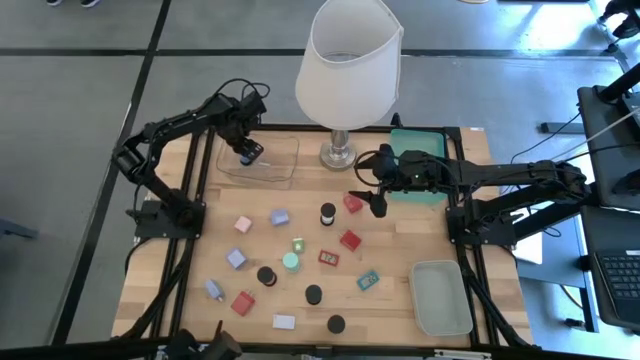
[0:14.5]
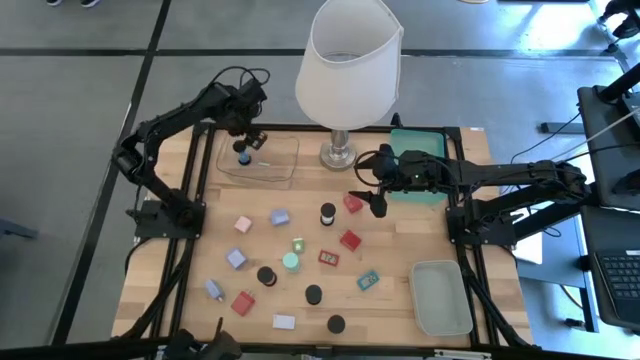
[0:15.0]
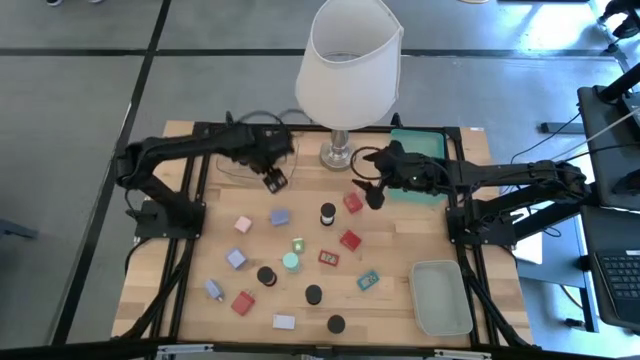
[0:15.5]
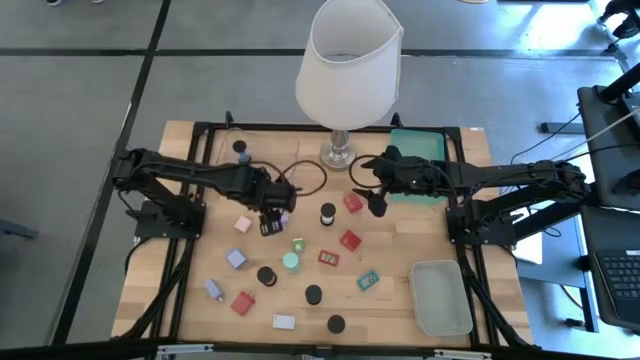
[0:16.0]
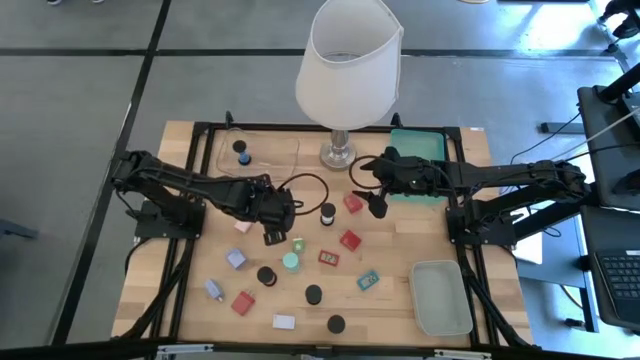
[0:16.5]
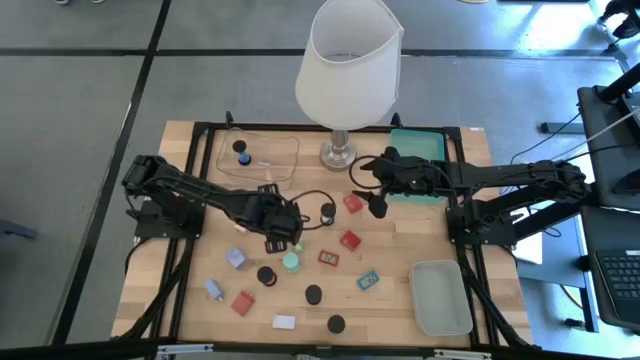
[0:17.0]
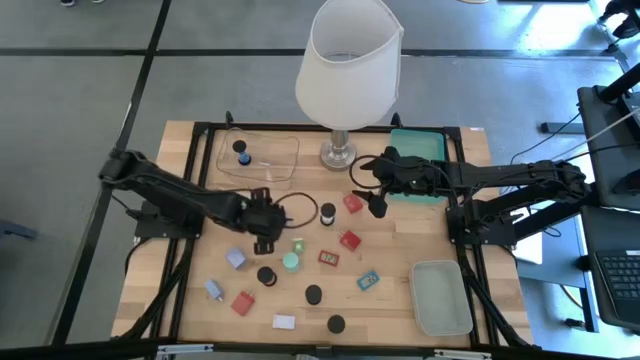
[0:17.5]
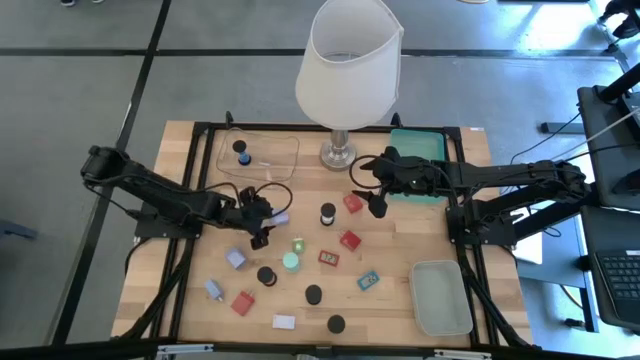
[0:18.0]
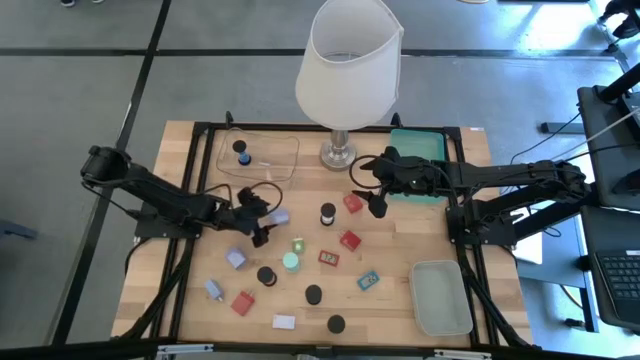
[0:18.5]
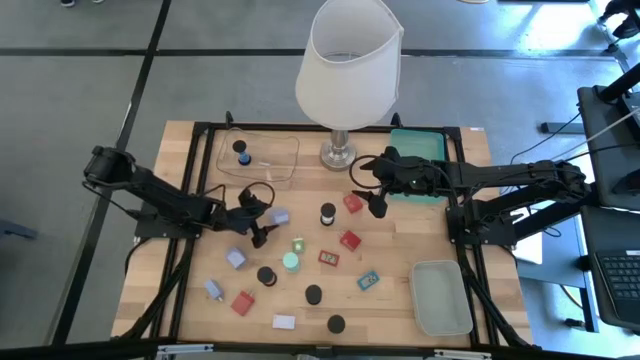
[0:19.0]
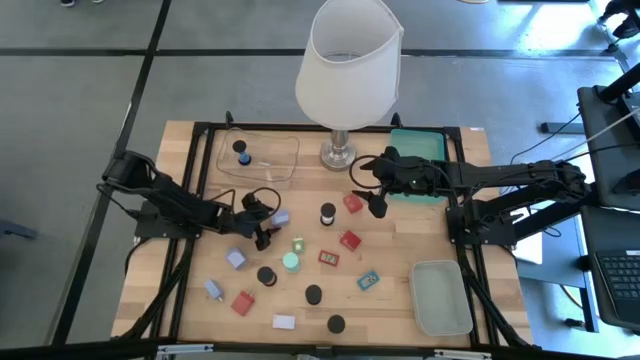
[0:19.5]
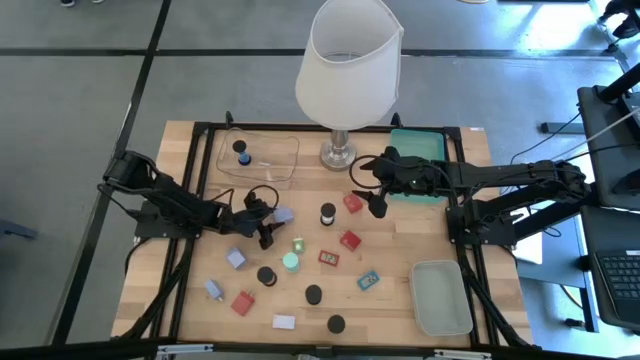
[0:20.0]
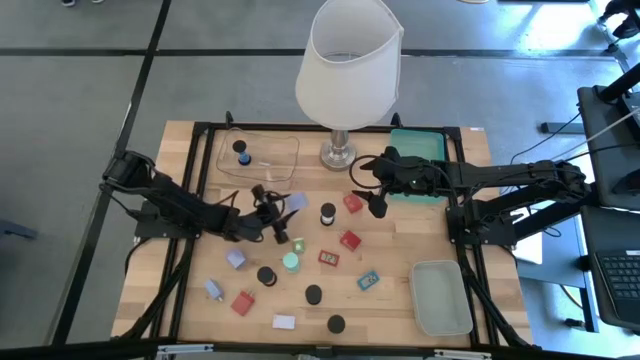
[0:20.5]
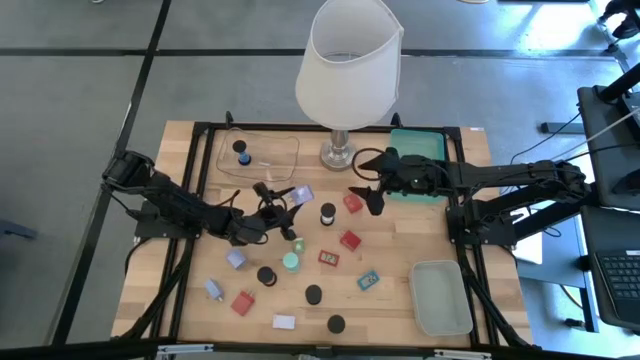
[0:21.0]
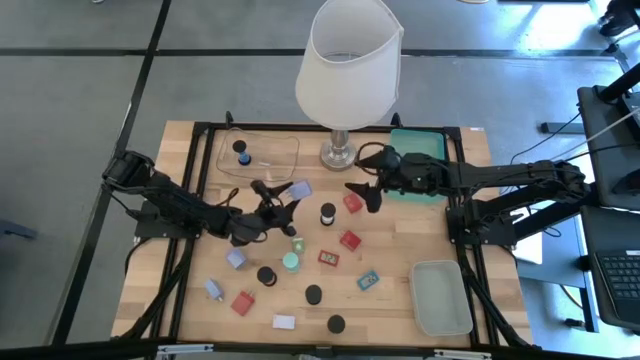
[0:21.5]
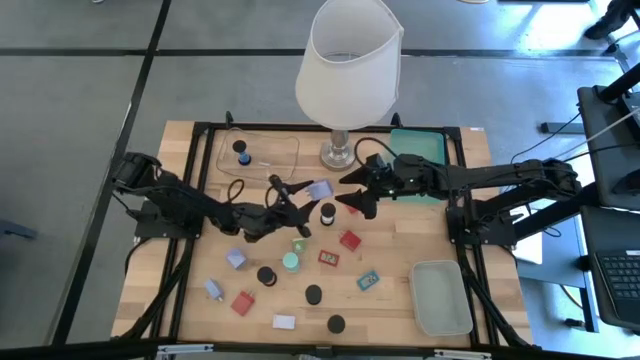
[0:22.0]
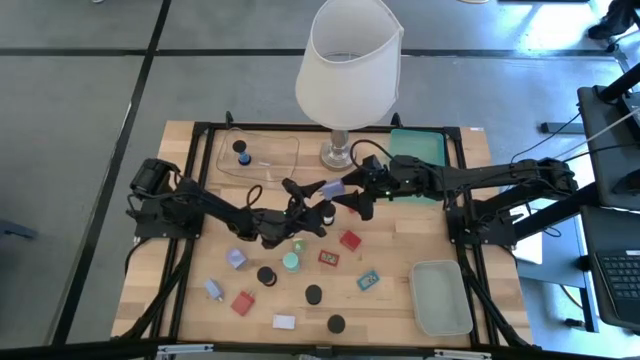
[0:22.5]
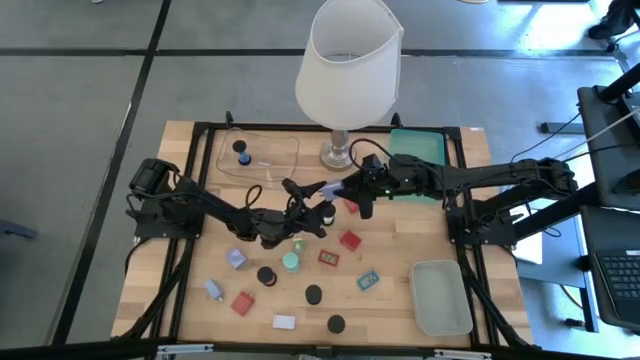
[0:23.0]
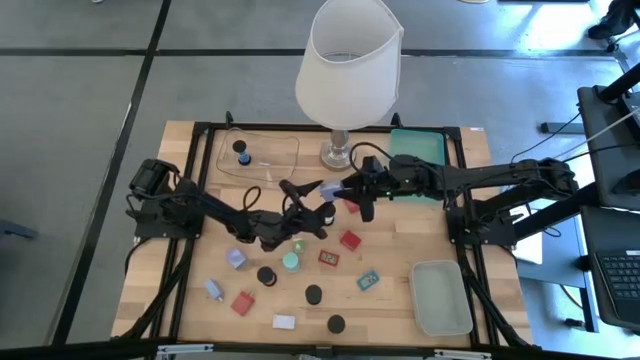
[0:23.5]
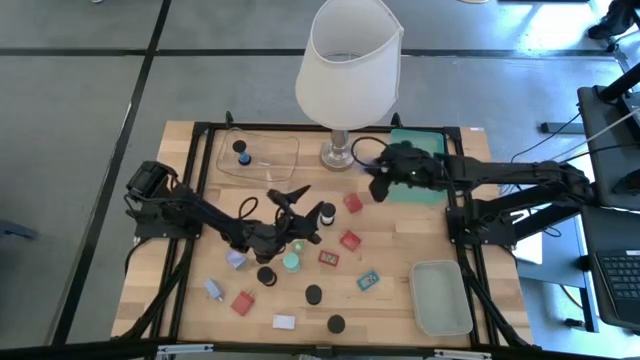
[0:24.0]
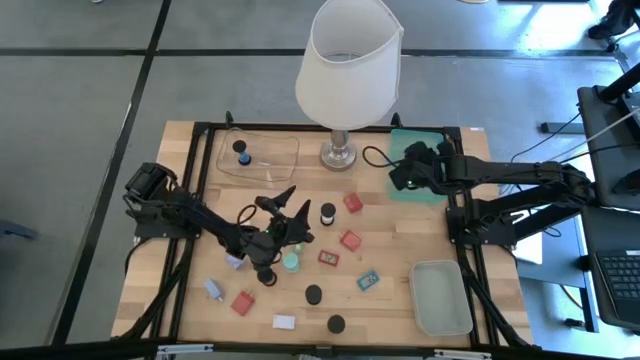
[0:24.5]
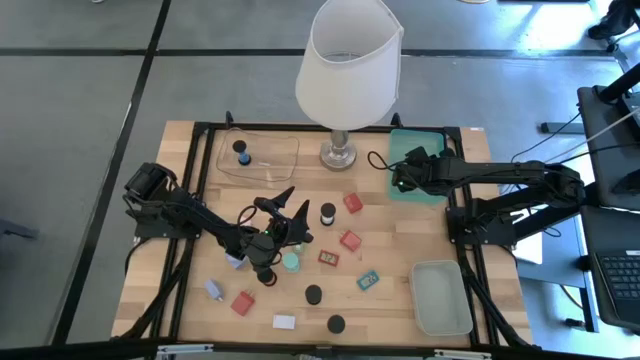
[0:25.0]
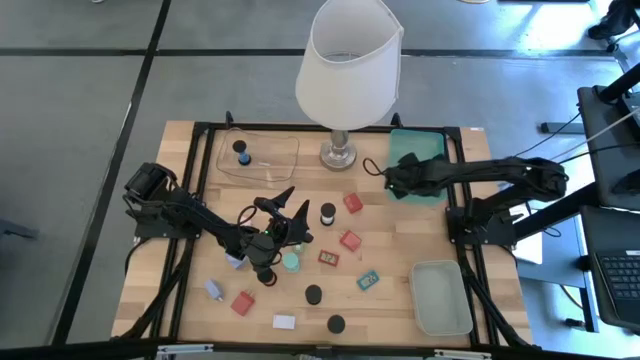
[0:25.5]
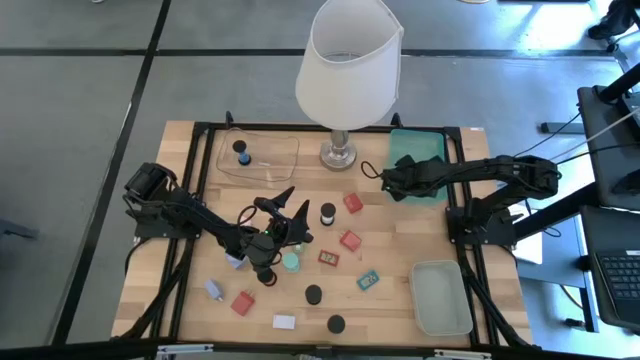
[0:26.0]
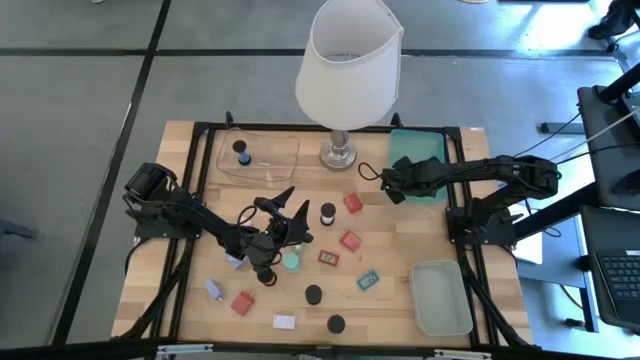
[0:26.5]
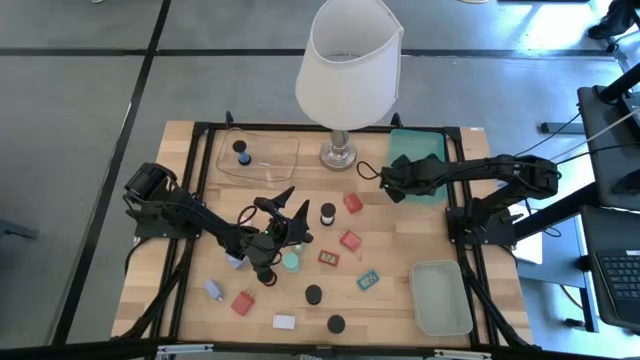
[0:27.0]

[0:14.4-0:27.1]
Task: Pick & Place Office items
Put the top purple charger adapter into the green bin

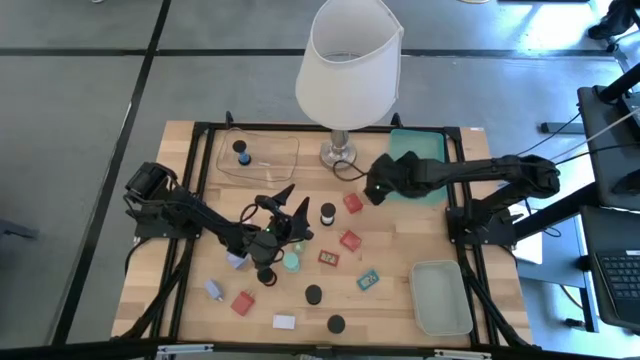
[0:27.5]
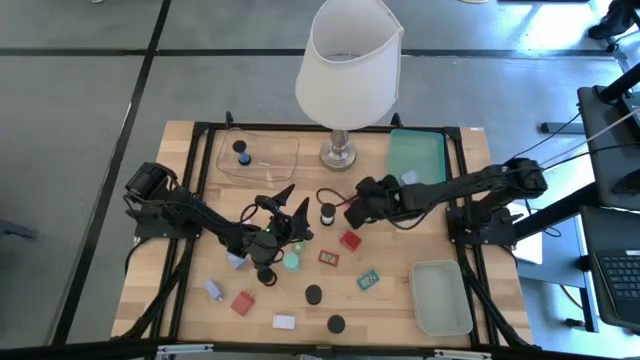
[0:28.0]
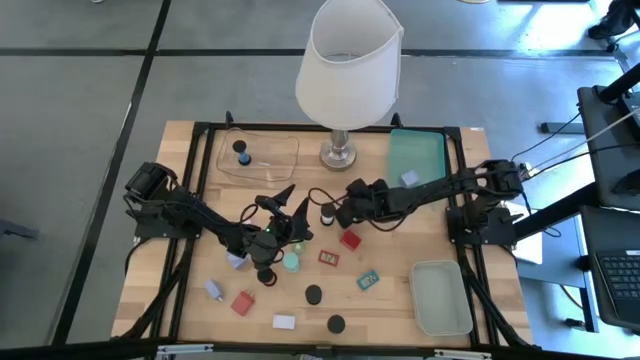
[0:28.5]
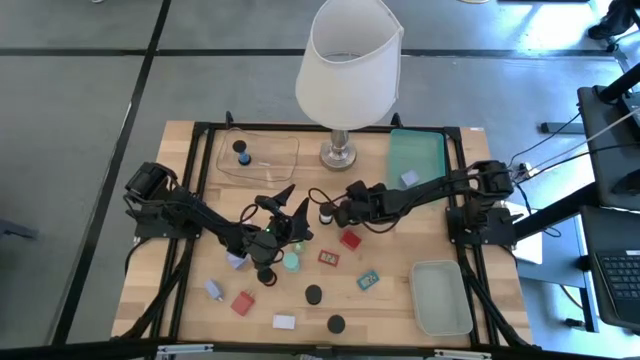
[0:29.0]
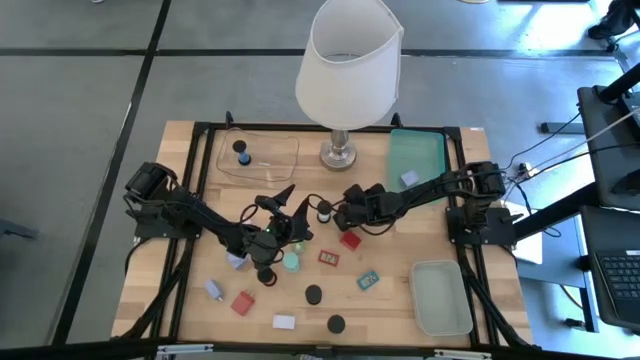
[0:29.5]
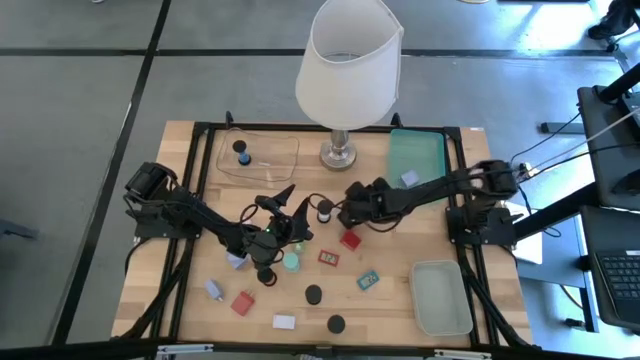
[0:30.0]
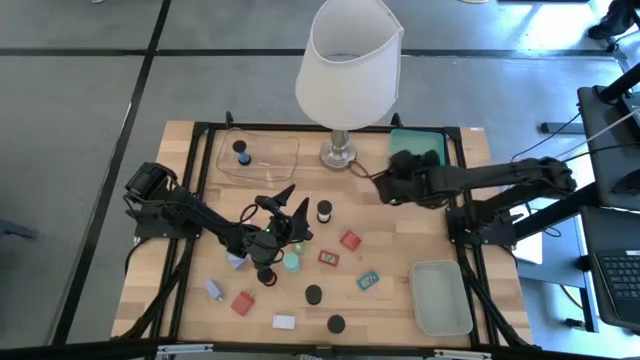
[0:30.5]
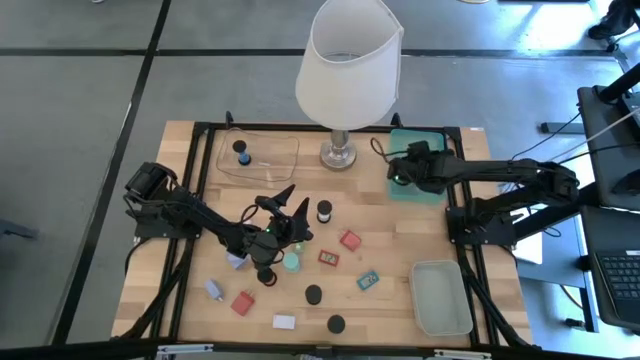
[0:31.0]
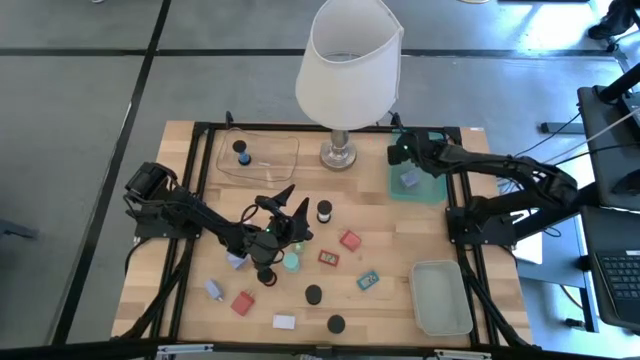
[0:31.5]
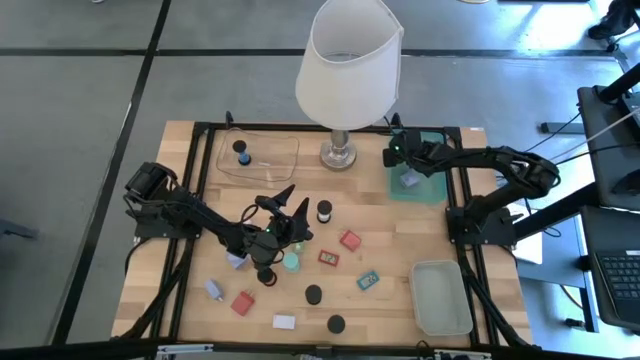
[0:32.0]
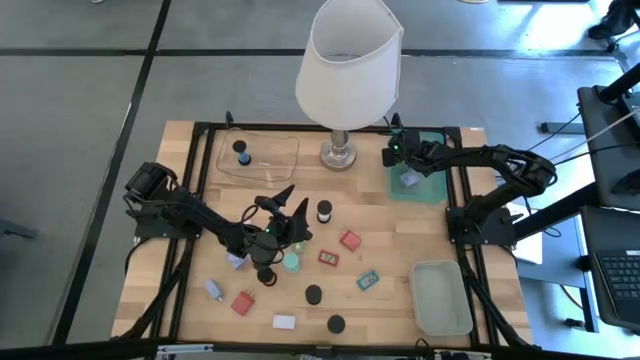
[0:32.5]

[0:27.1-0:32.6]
Put the top red charger adapter into the green bin

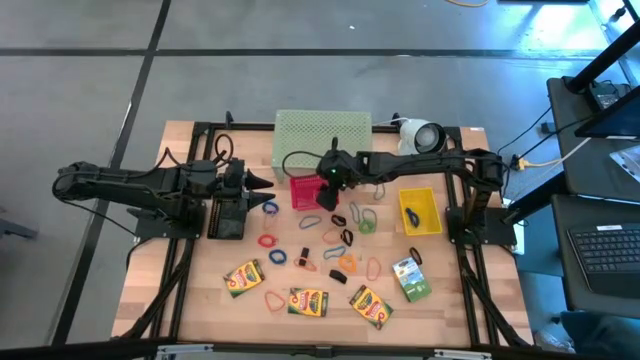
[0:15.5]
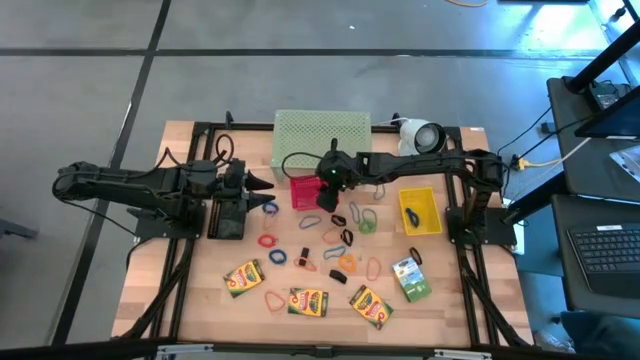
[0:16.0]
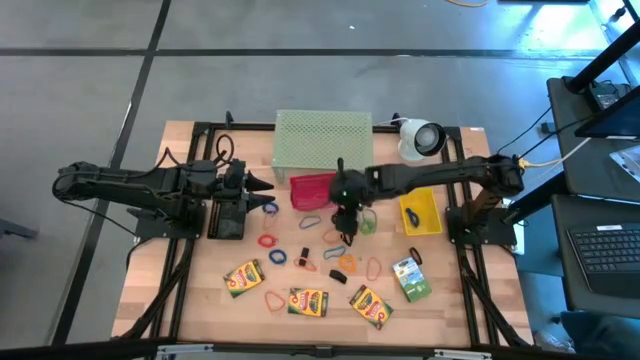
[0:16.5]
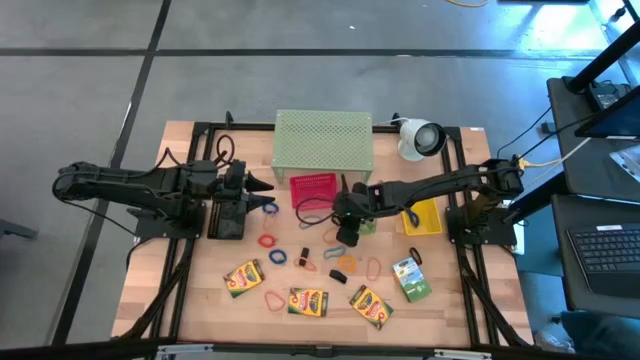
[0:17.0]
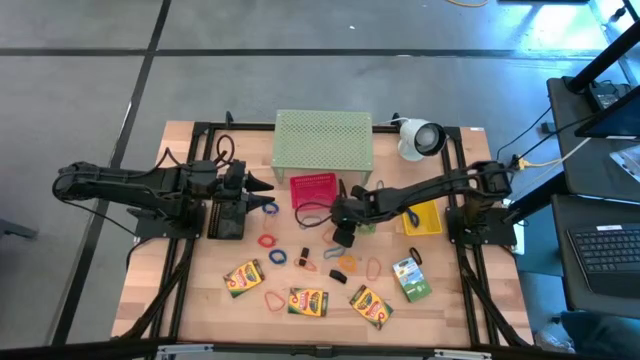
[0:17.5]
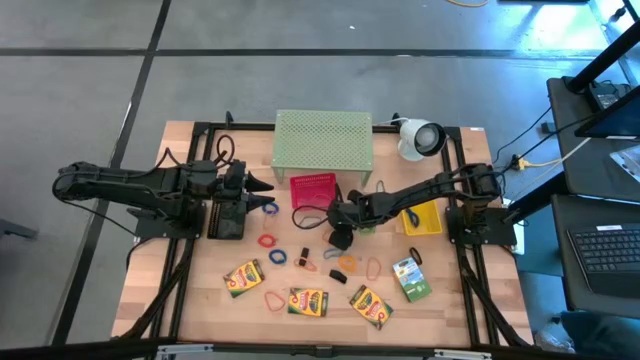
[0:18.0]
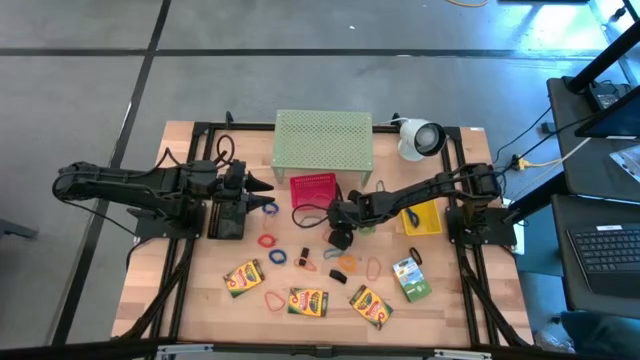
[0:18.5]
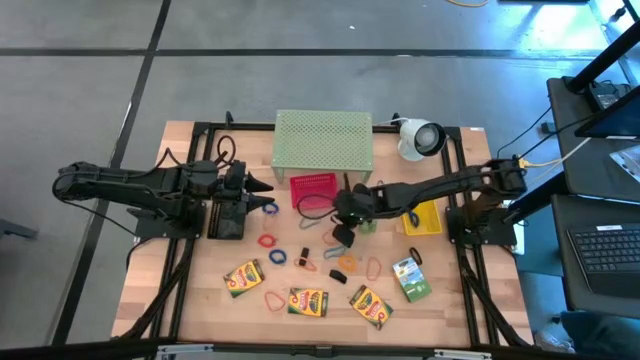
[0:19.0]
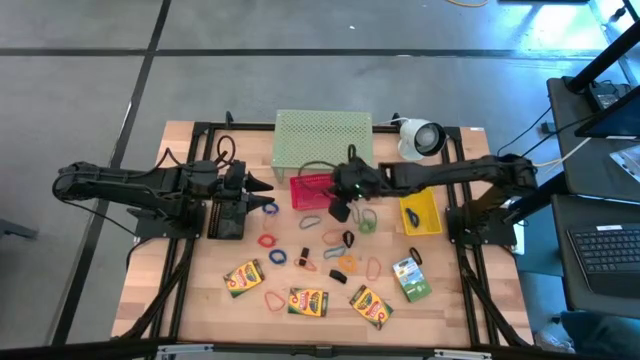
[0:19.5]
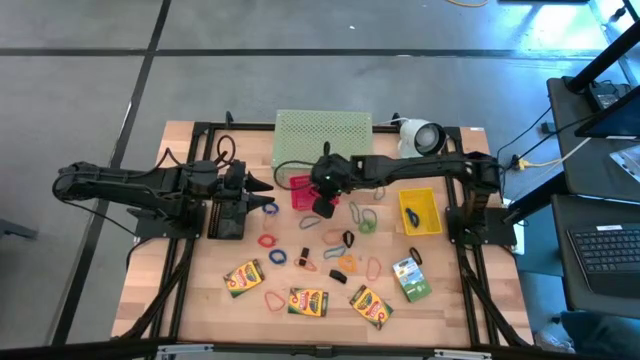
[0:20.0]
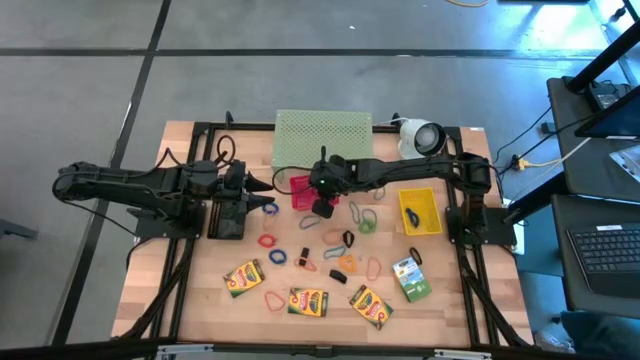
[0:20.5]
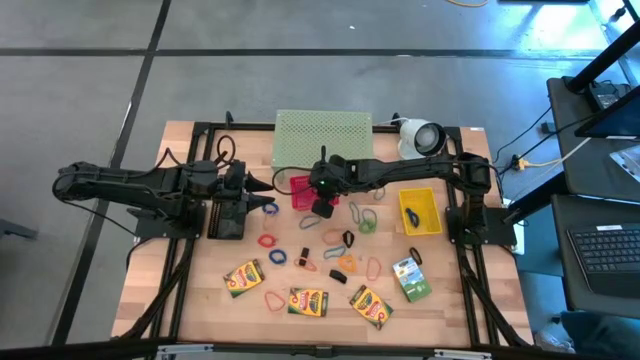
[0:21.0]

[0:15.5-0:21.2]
Task: Pick & Place Office Desk Supplies
Put the black rubber band into the red bin
